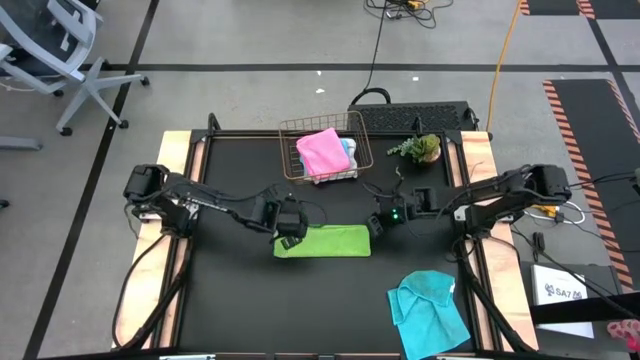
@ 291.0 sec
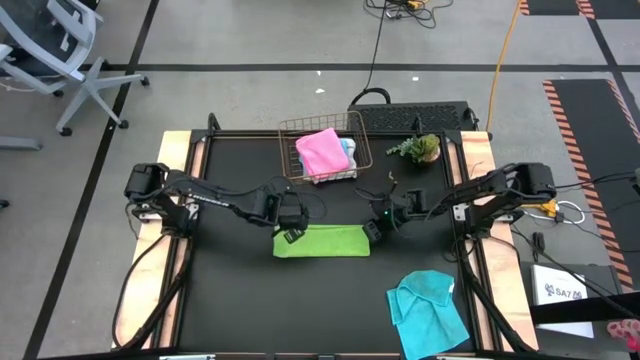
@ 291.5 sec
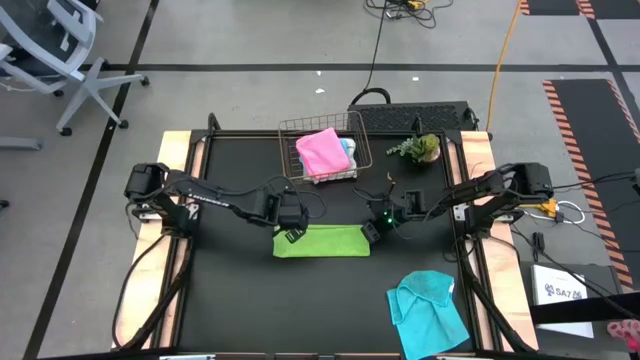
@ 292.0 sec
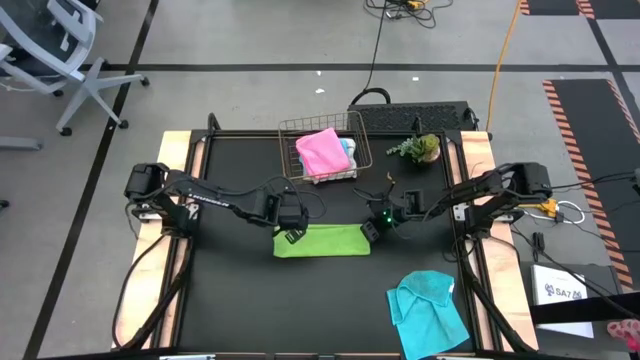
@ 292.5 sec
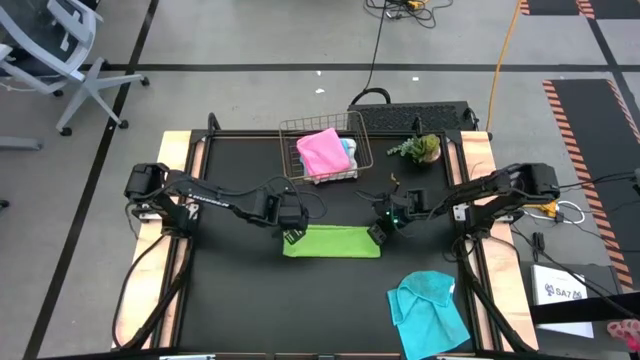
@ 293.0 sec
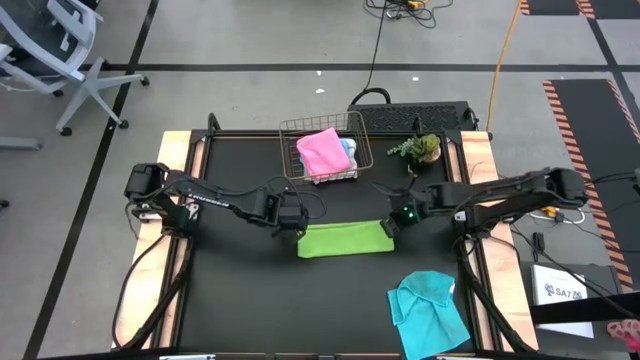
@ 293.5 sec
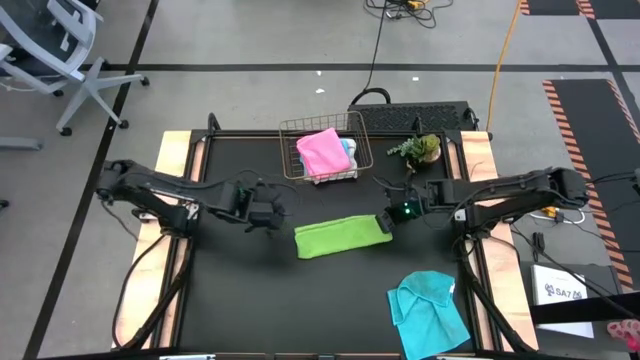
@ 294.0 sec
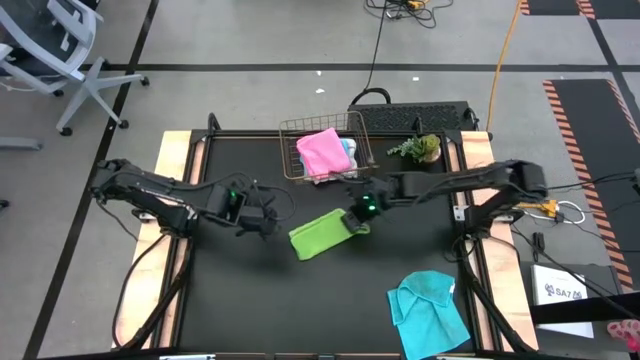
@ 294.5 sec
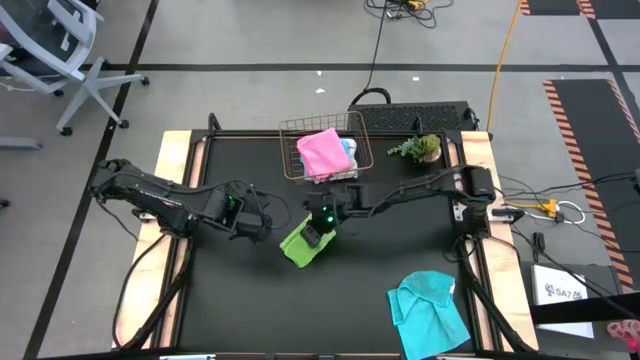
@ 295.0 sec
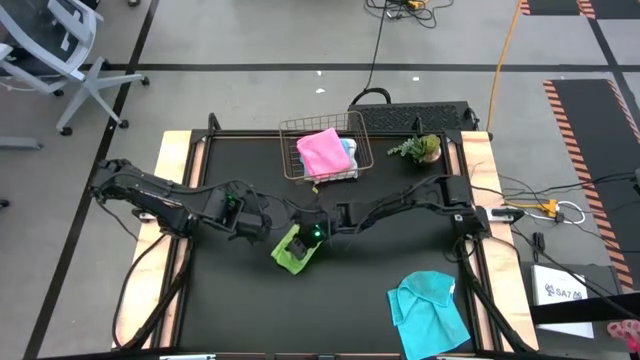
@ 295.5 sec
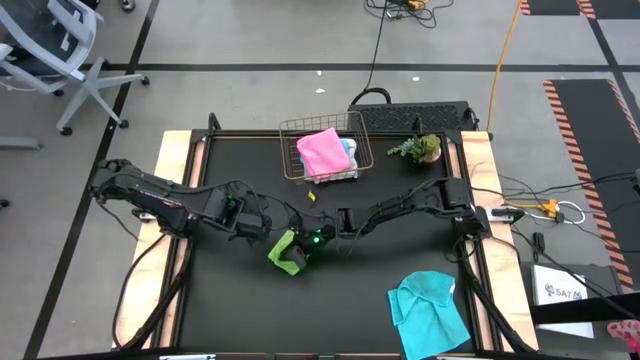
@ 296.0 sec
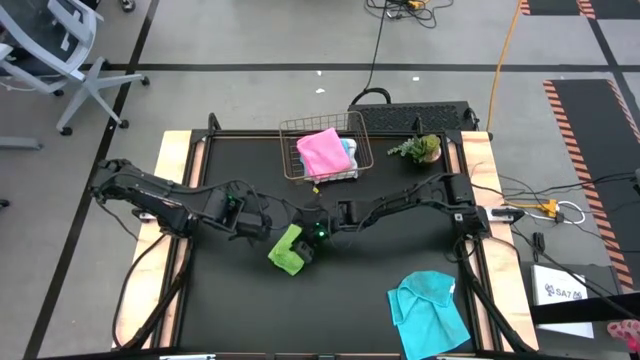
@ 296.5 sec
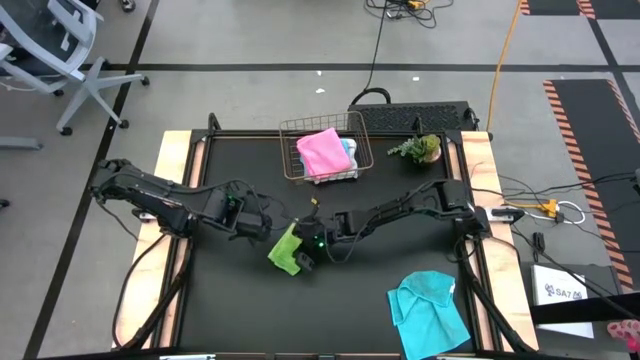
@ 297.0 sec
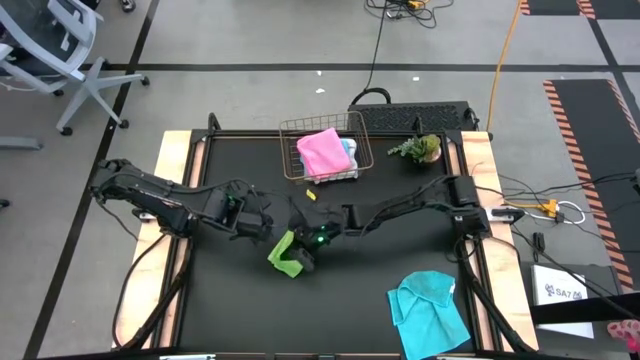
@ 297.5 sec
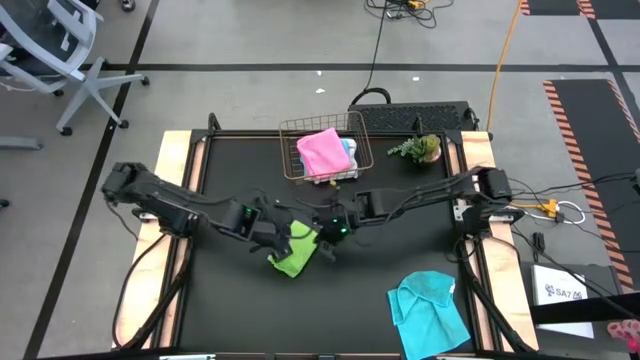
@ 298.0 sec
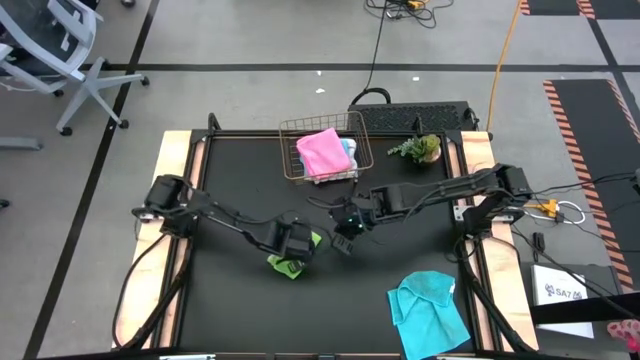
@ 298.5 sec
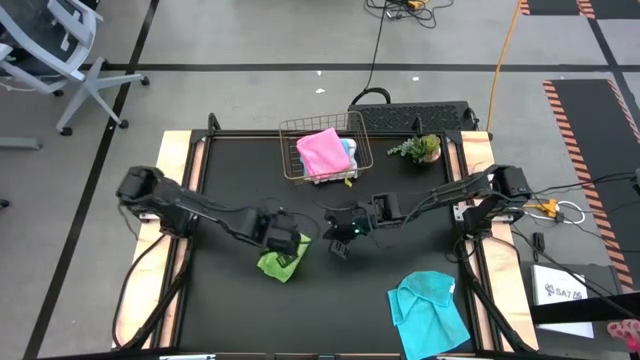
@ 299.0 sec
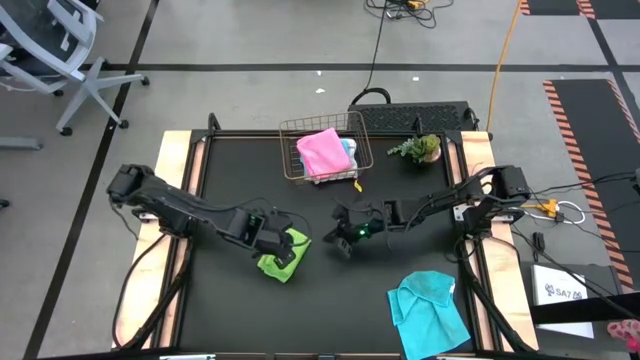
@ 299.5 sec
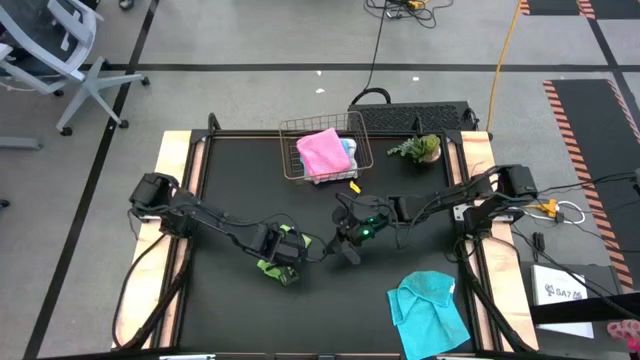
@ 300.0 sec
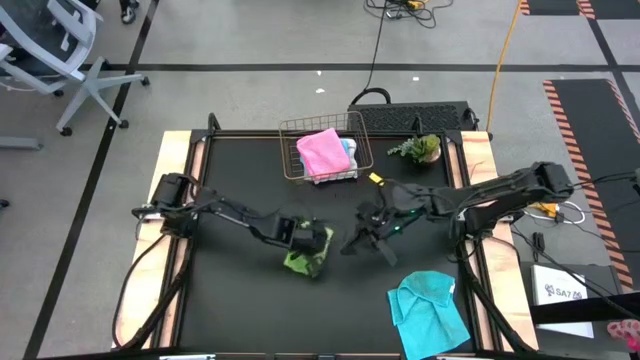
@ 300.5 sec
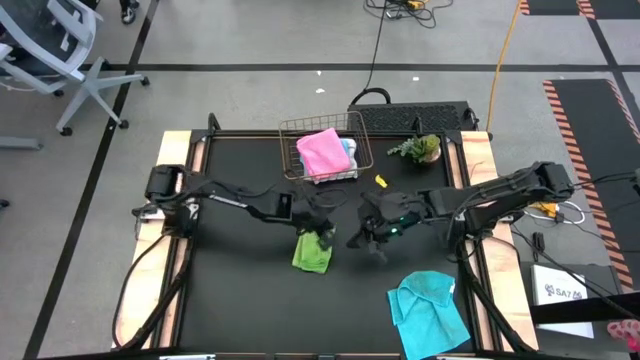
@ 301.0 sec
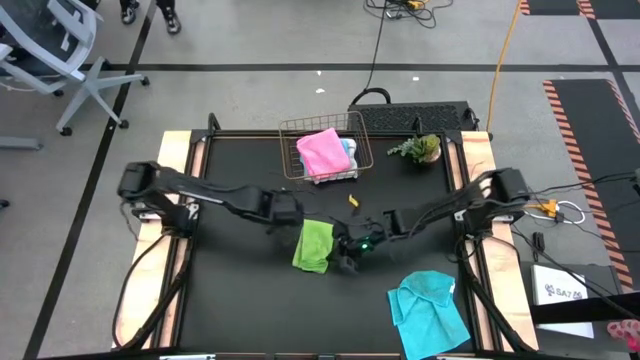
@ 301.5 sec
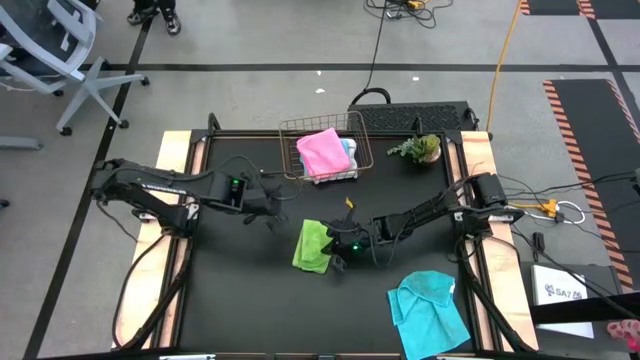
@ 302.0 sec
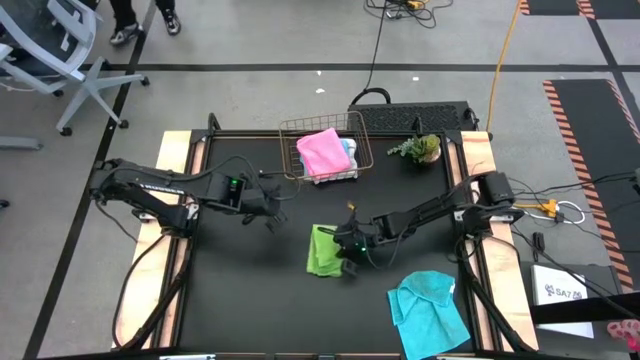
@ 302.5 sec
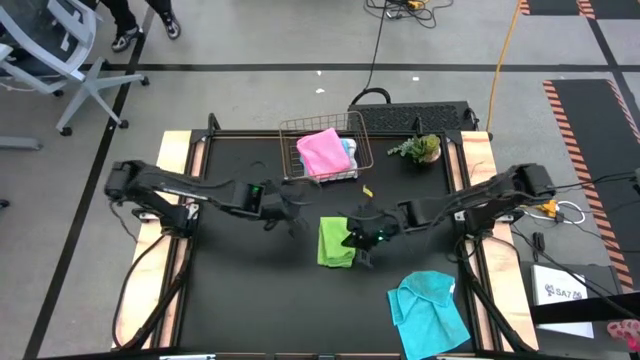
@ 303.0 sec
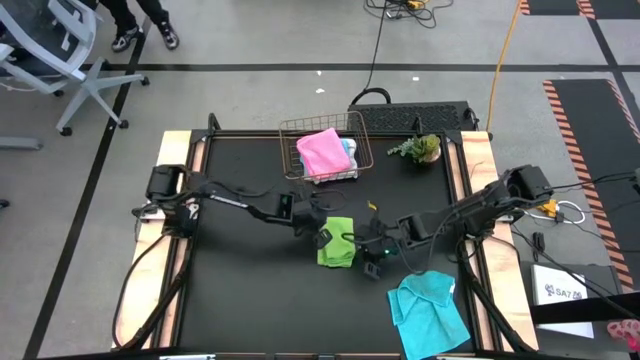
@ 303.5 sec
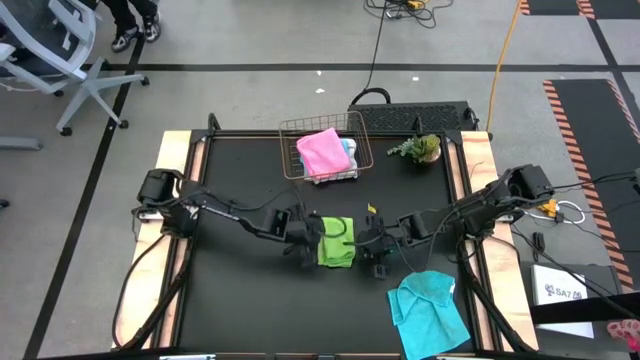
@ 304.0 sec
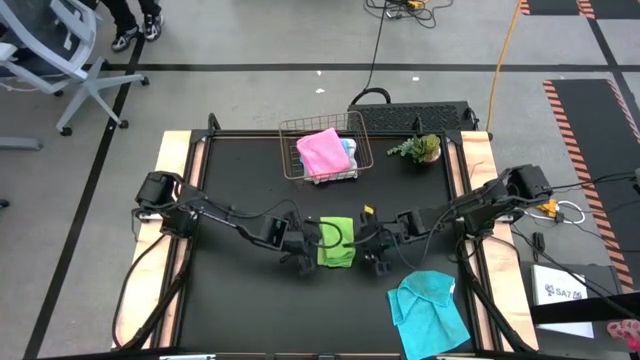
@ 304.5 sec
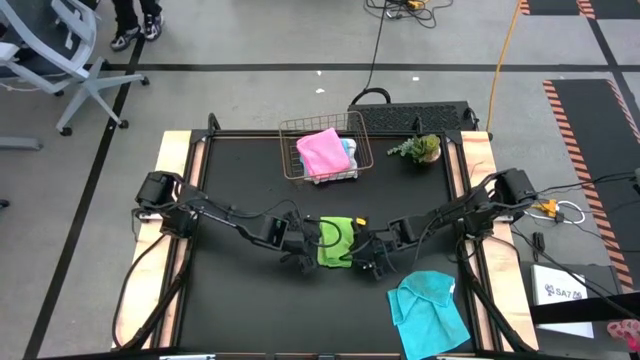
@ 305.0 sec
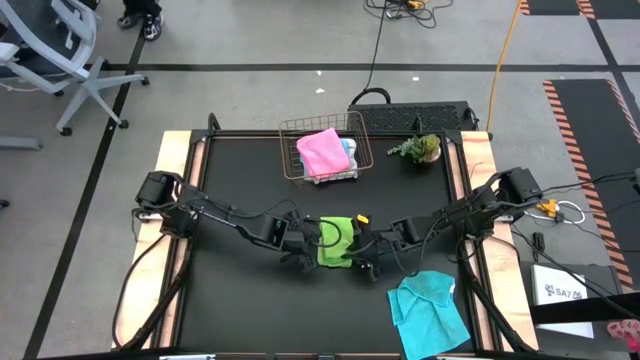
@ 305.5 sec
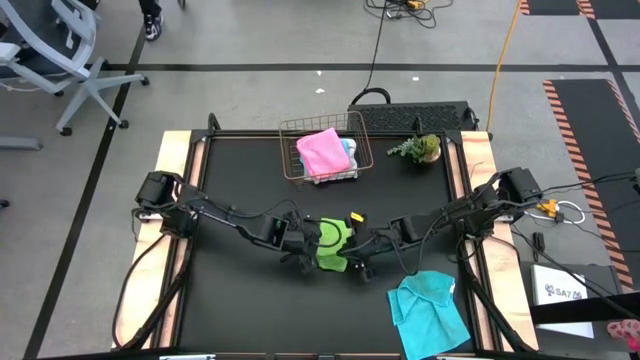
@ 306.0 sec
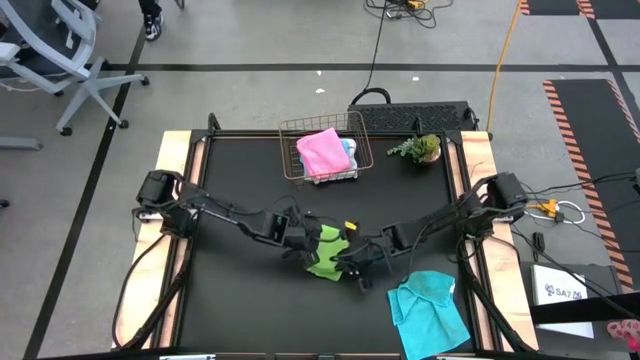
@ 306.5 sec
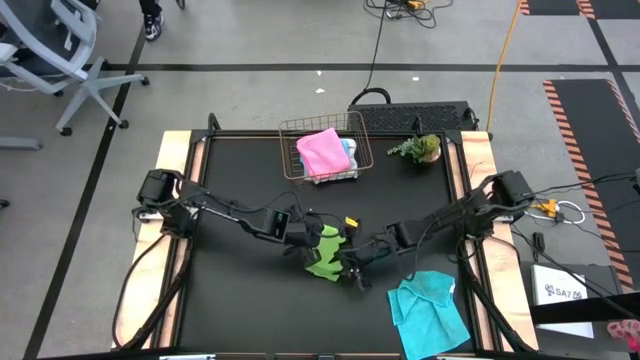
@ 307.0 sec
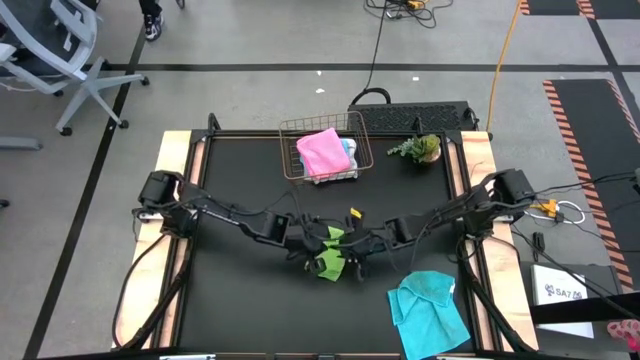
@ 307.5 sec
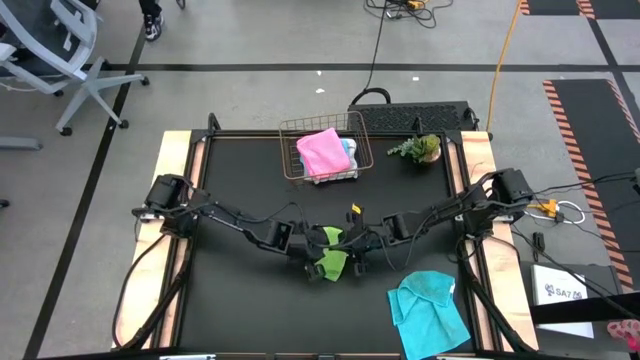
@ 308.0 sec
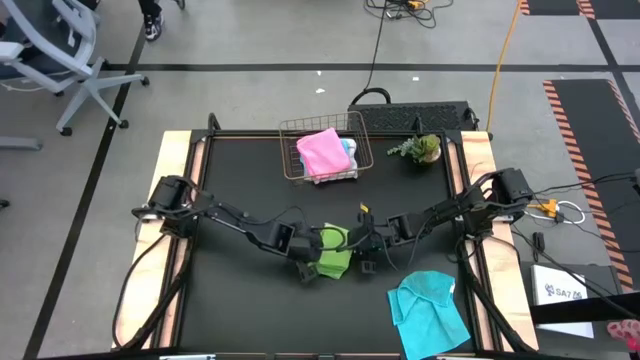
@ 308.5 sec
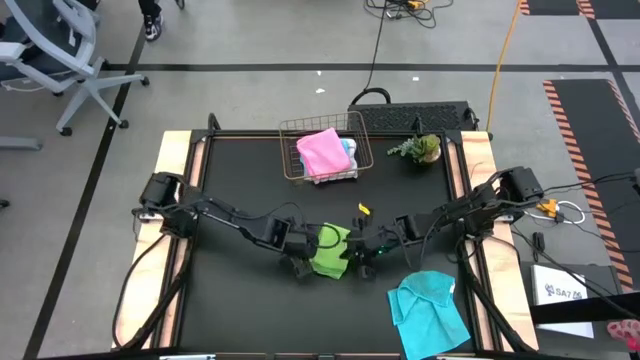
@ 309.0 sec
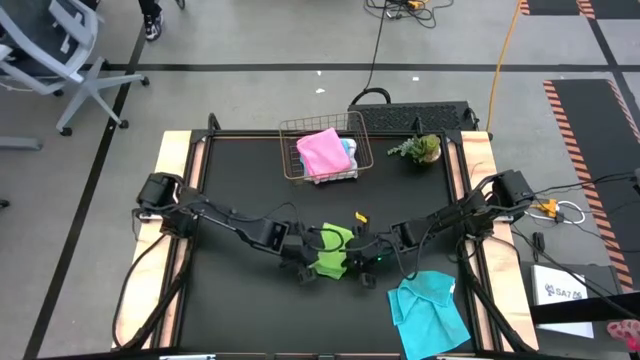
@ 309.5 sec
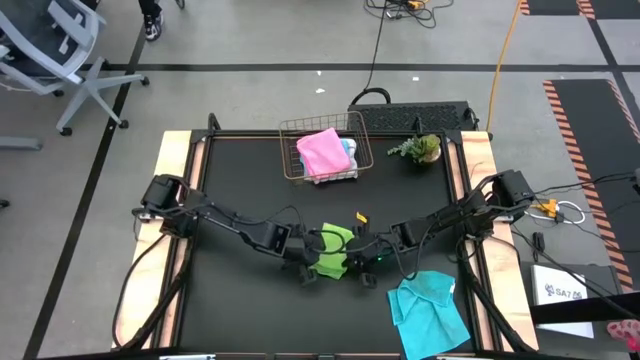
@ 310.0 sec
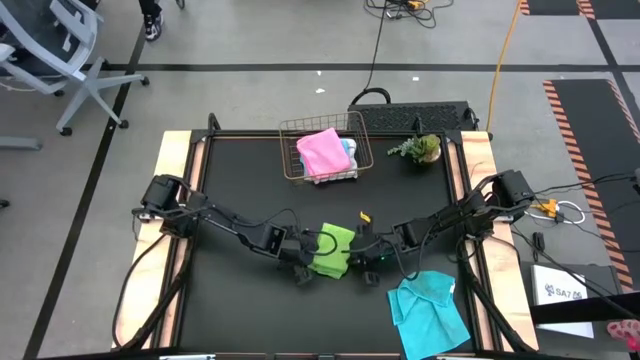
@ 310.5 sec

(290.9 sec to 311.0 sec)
Task: Fold microfiber towels
Fold the green microfiber cloth
